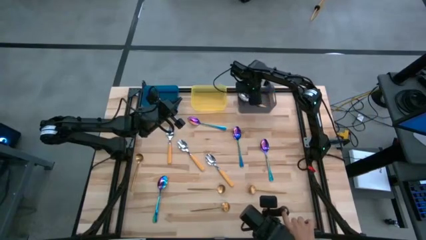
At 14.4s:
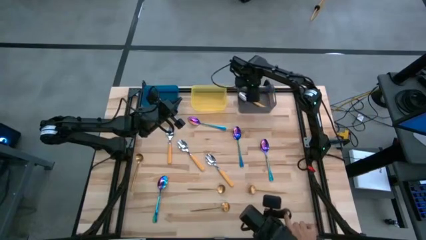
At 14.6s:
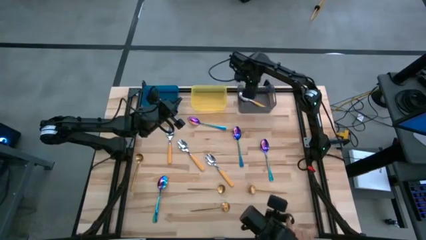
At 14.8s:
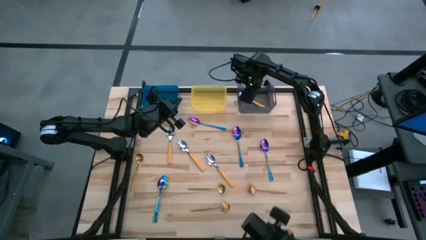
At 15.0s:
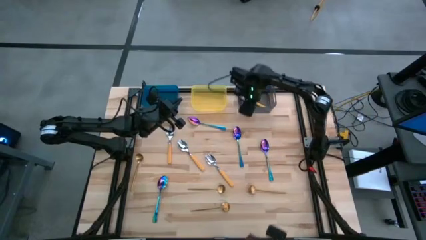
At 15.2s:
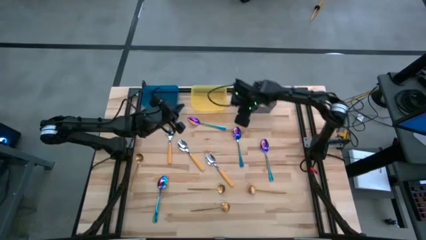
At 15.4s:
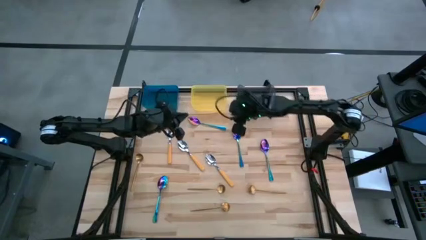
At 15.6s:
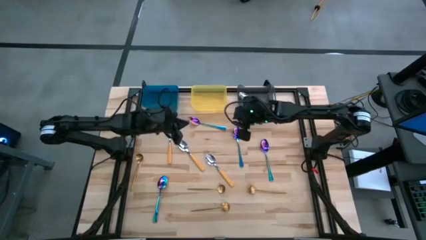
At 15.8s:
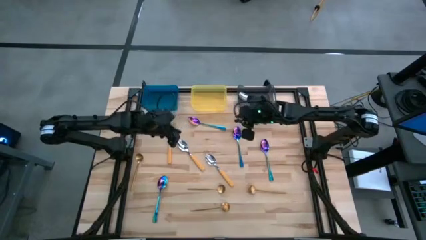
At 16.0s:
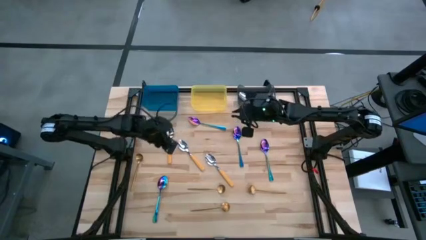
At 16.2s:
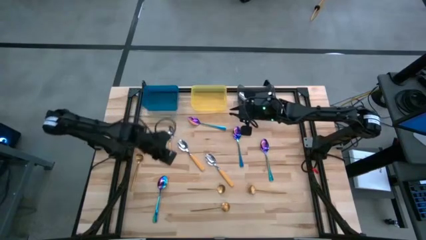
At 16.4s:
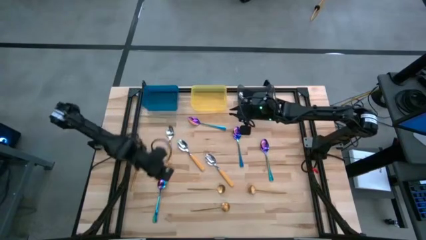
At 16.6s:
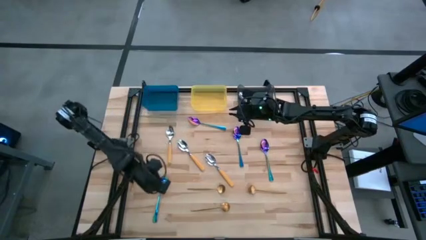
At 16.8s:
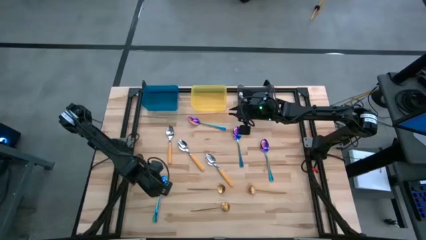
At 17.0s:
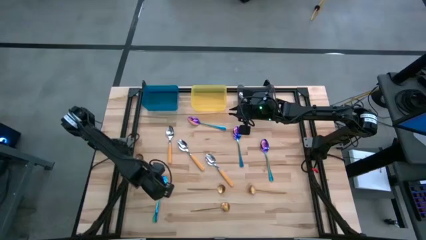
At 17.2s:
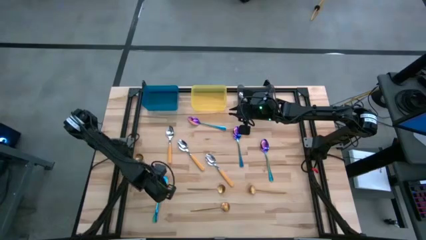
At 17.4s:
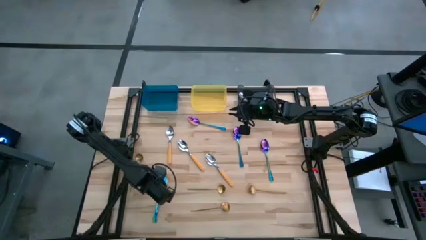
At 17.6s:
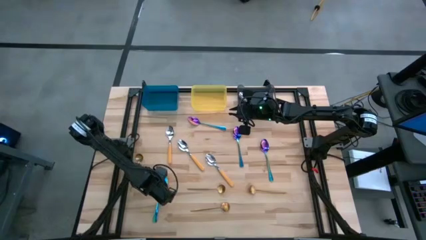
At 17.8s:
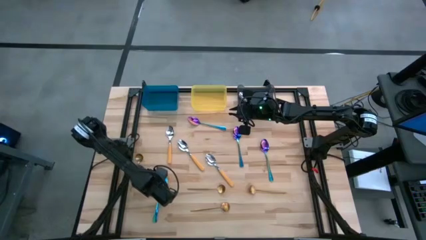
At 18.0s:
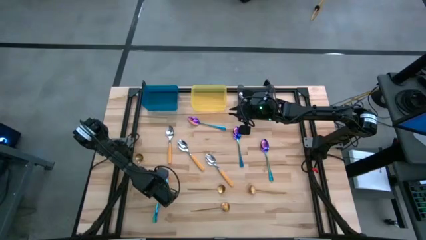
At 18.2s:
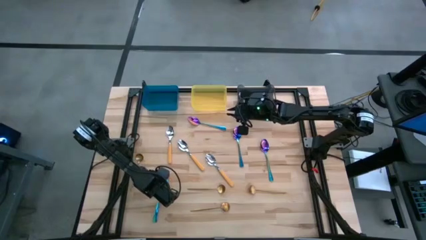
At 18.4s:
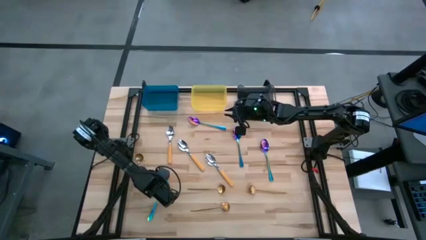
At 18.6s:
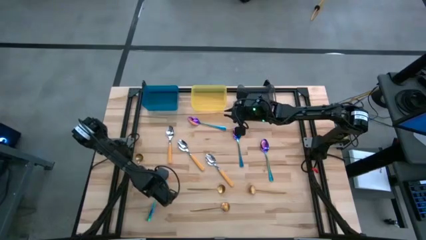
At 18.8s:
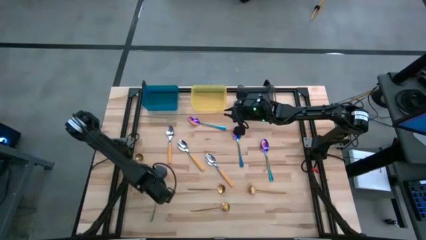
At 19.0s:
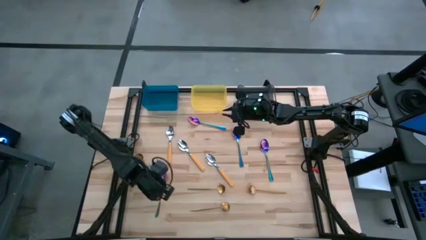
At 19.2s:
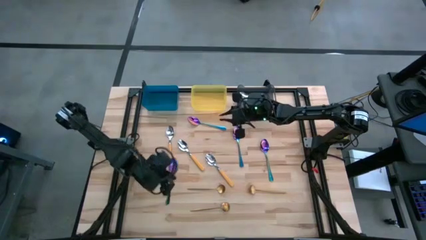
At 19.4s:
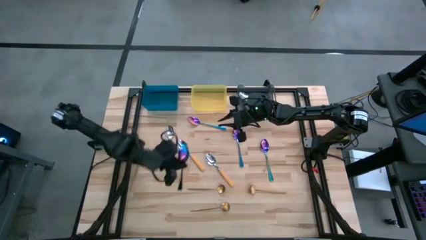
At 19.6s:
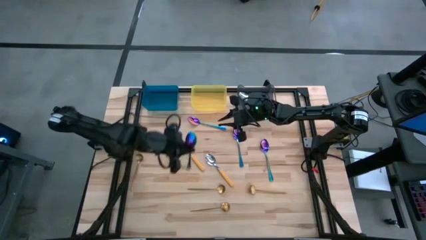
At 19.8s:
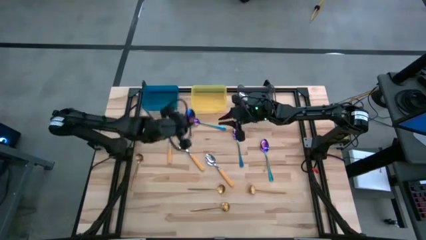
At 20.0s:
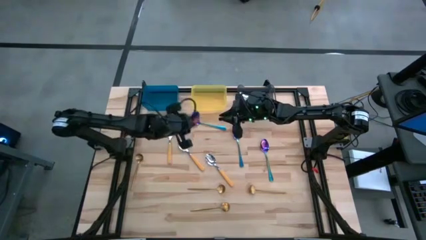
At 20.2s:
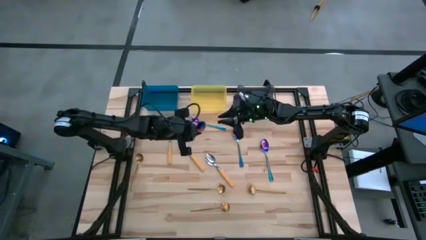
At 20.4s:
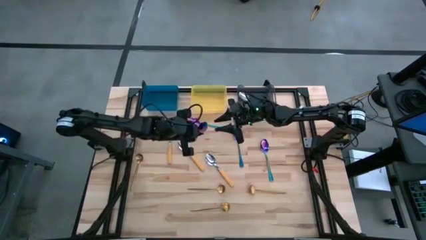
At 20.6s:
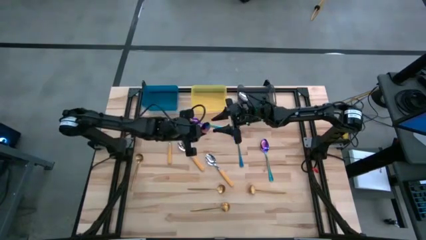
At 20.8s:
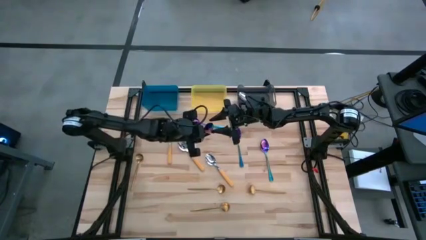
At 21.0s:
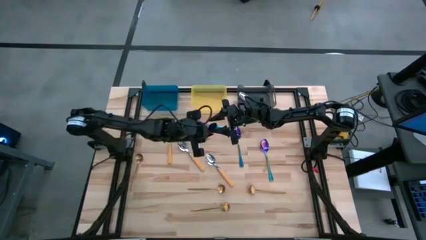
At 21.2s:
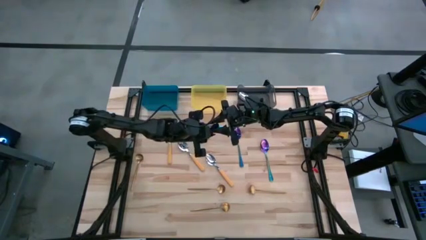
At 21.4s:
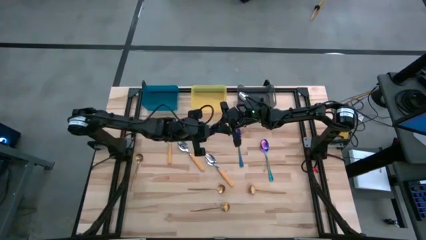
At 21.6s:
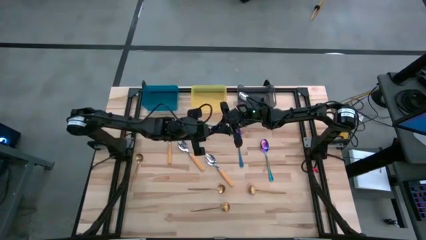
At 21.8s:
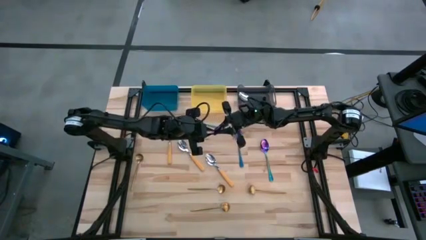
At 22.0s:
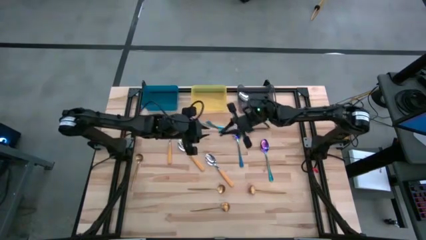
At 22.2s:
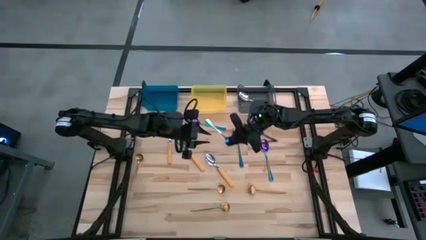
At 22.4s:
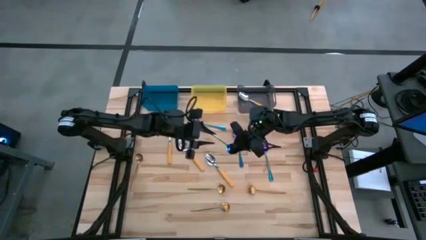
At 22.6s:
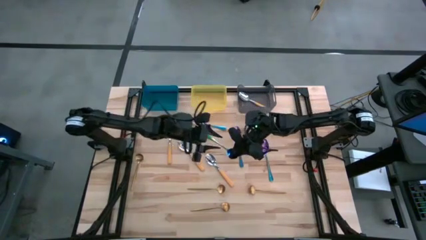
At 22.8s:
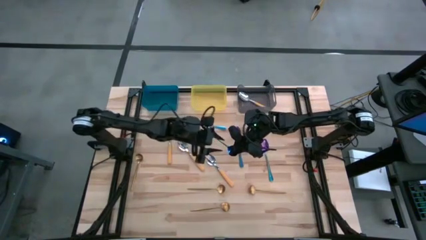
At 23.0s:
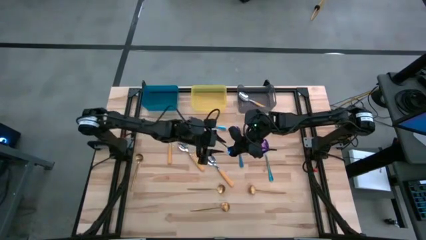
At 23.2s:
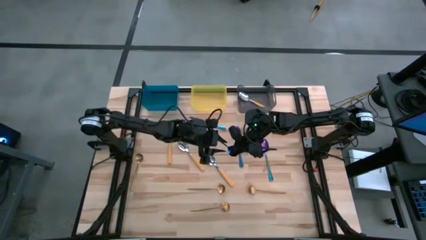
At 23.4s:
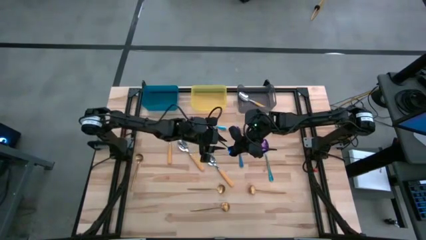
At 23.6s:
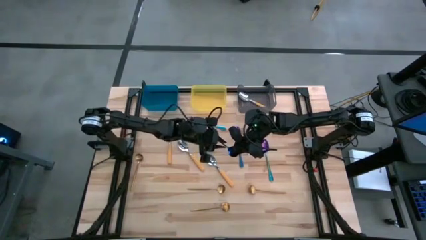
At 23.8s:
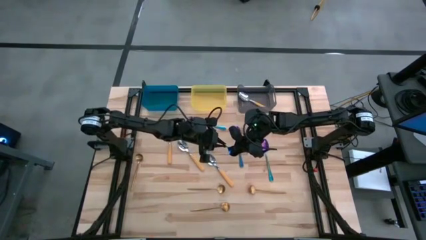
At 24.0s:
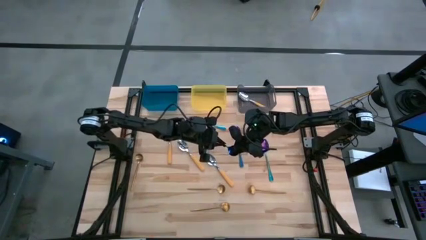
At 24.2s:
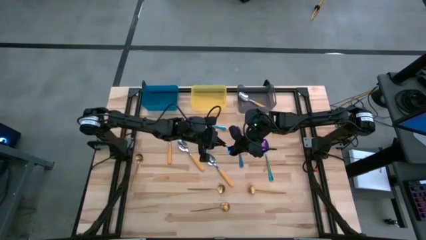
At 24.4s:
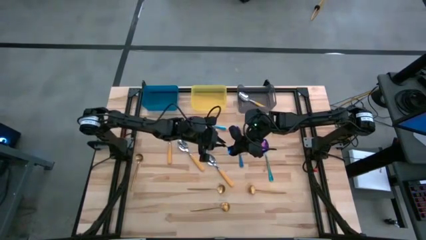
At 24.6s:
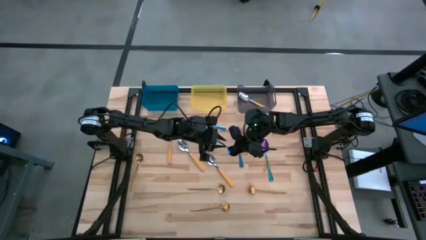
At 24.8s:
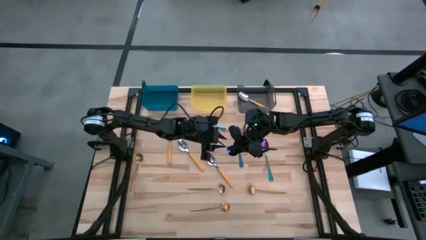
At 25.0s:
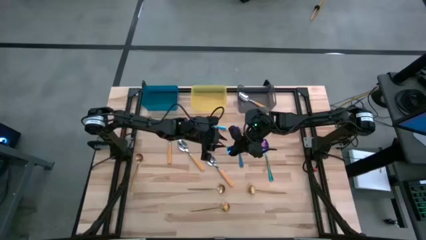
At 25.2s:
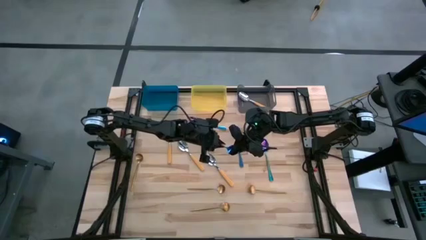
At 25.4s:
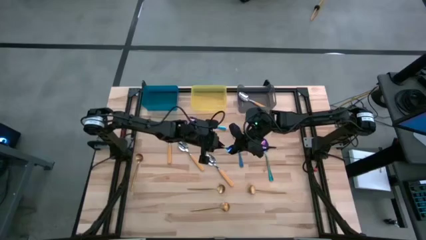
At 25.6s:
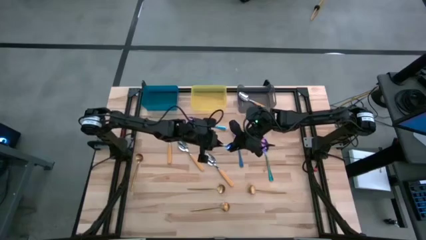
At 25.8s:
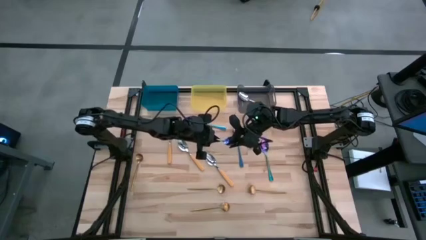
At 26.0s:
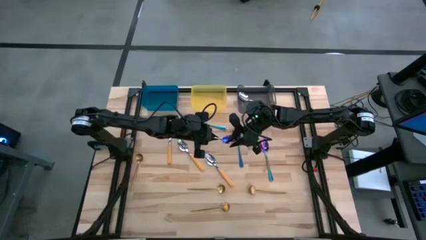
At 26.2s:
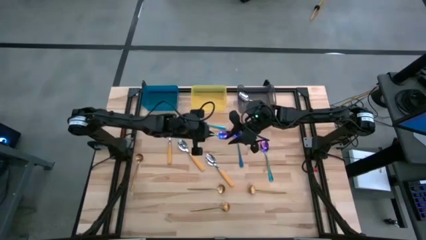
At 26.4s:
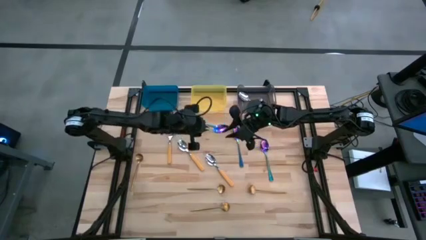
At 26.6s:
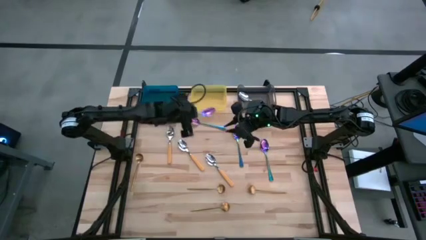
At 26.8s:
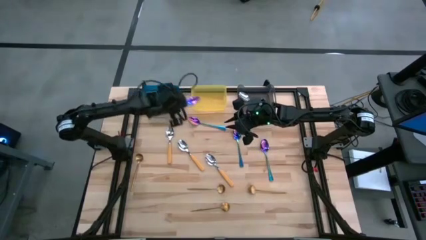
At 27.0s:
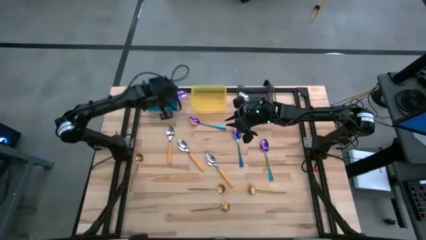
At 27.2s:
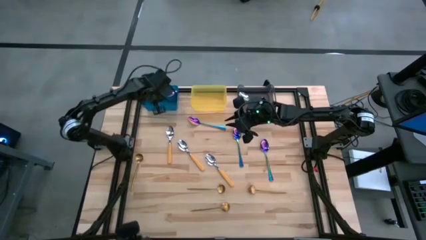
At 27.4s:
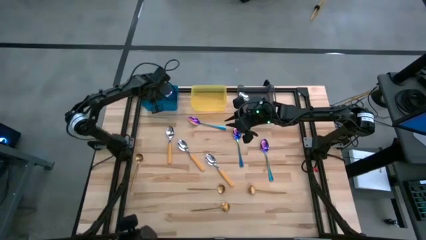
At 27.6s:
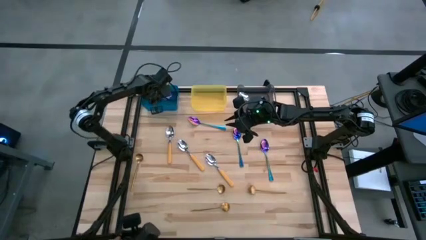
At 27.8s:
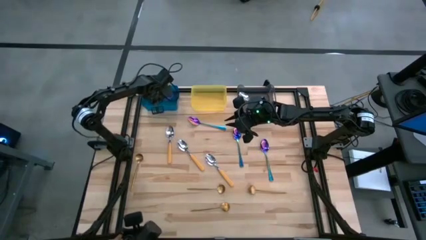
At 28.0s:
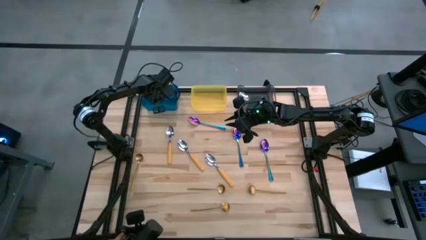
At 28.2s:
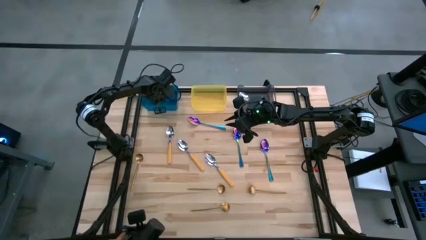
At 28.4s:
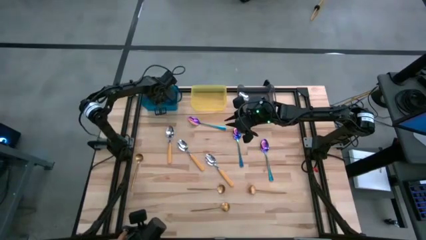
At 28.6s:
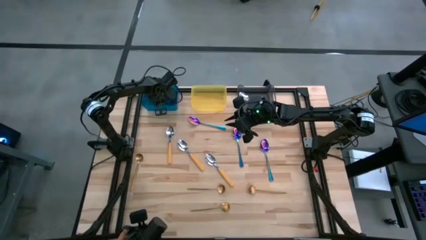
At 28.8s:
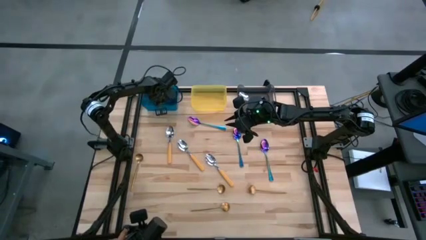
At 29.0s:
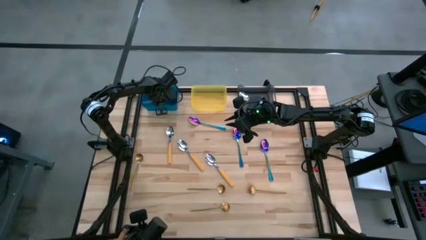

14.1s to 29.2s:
Task: Sort silverware by color (type)
Put the blue spoon into the blue bin
